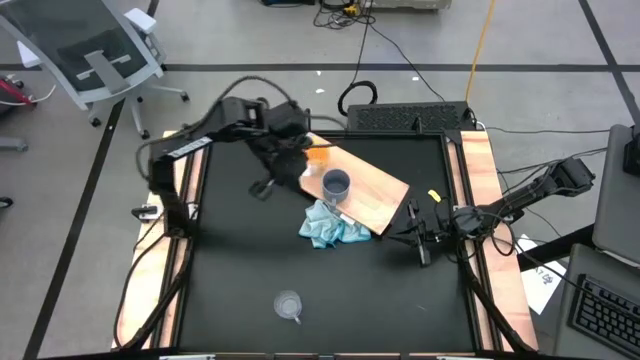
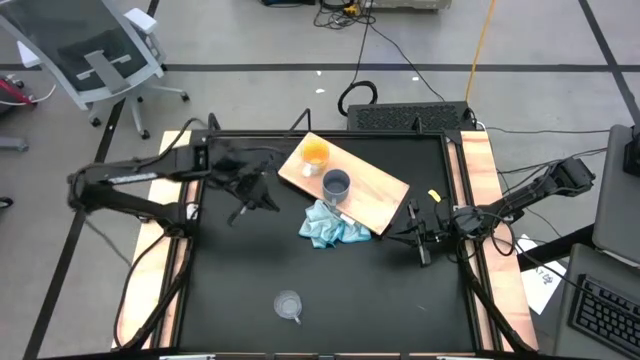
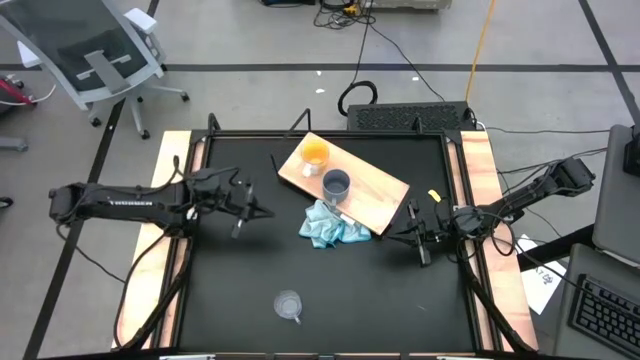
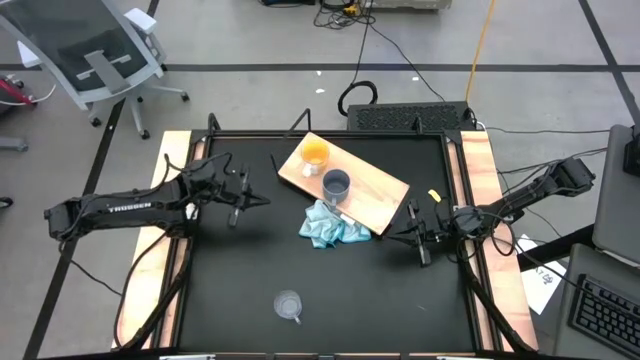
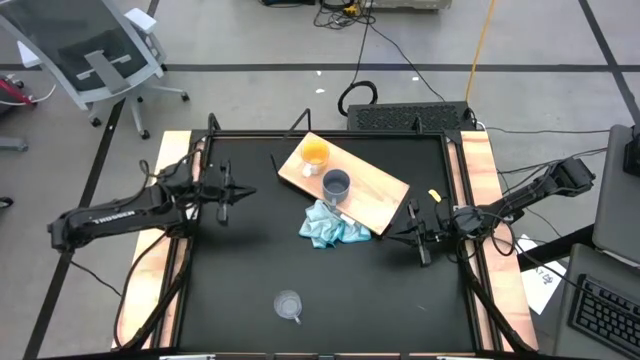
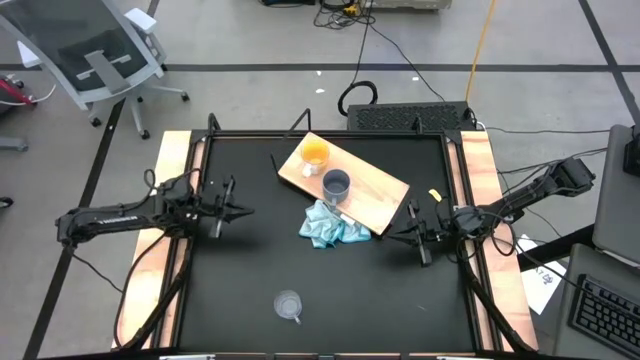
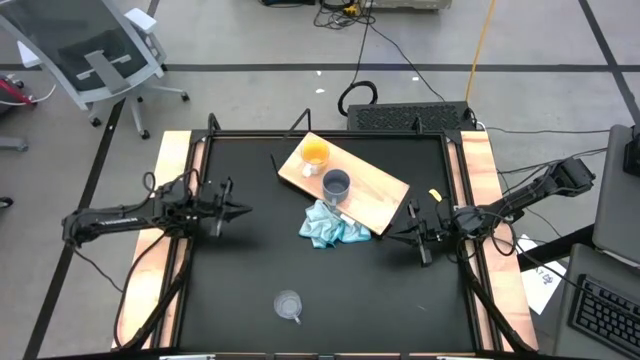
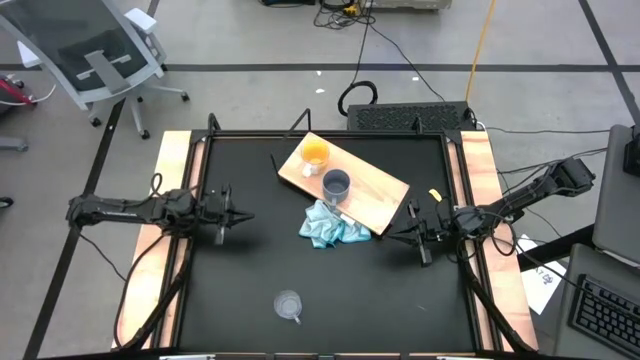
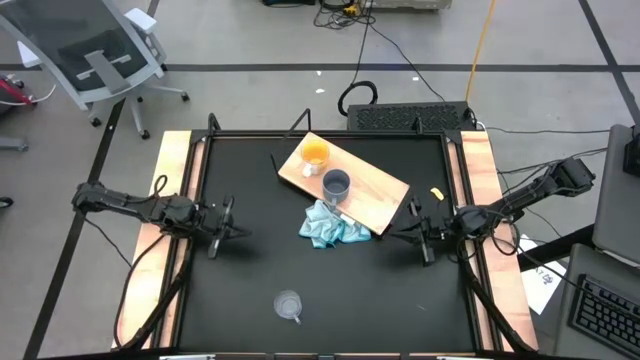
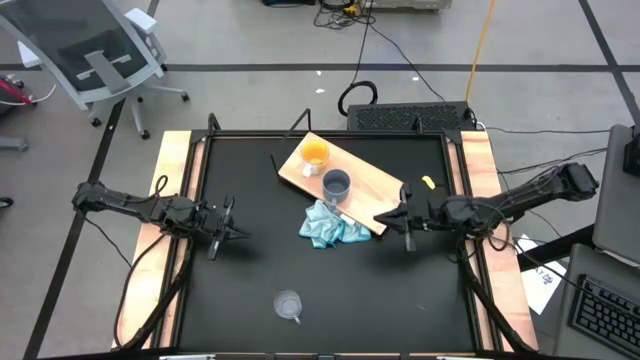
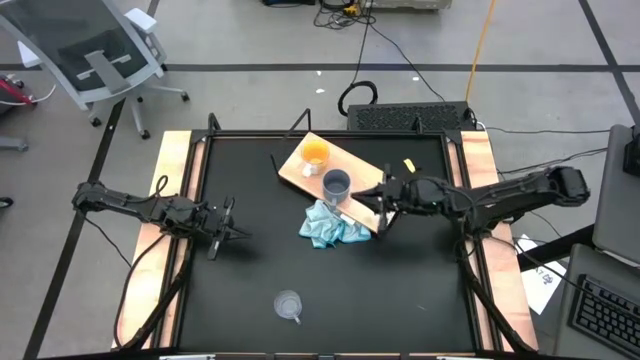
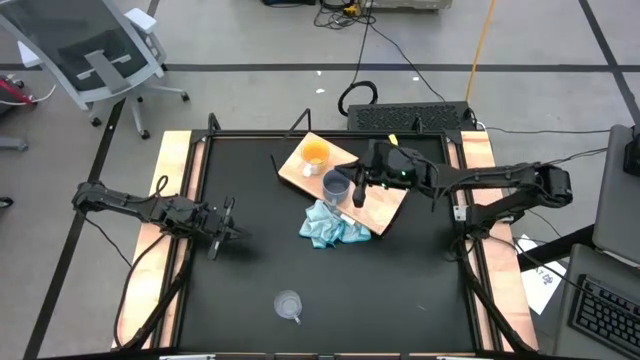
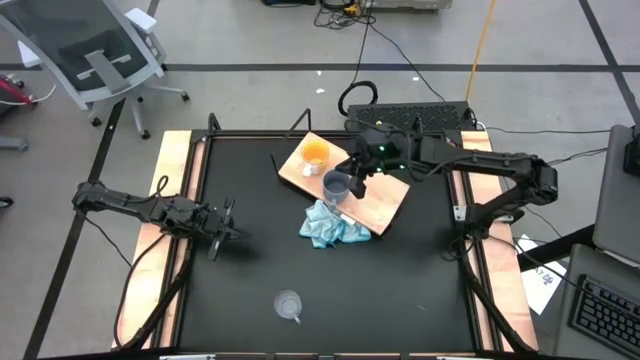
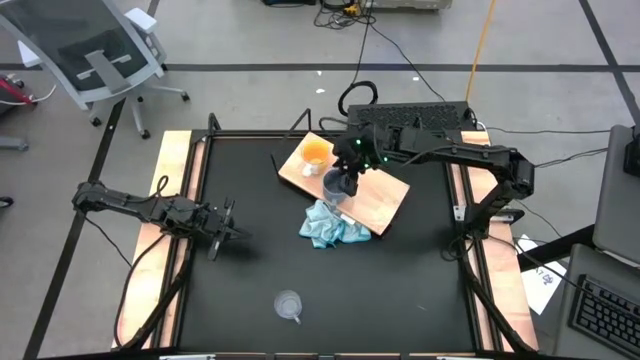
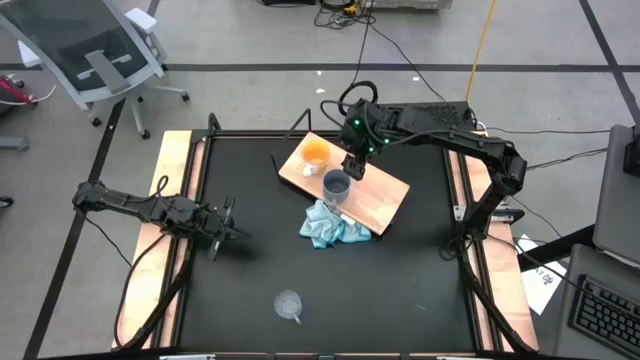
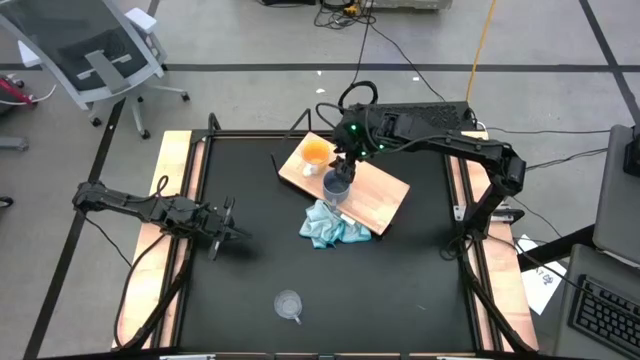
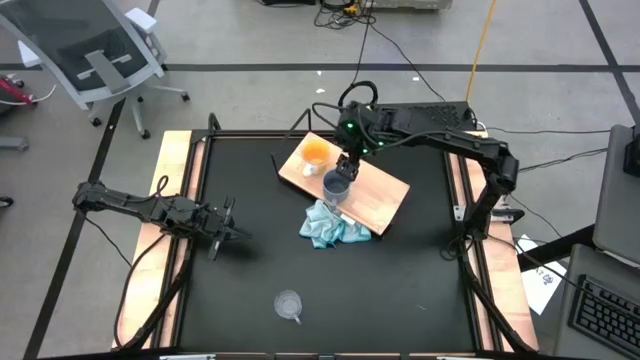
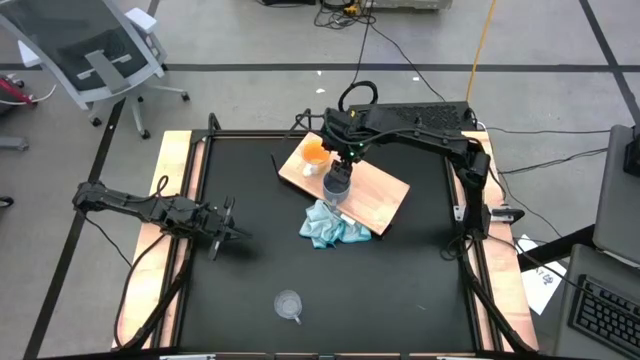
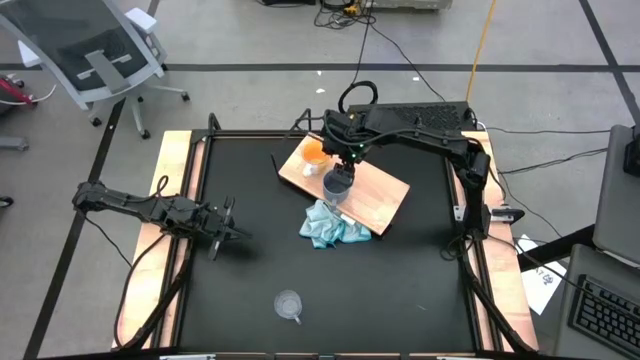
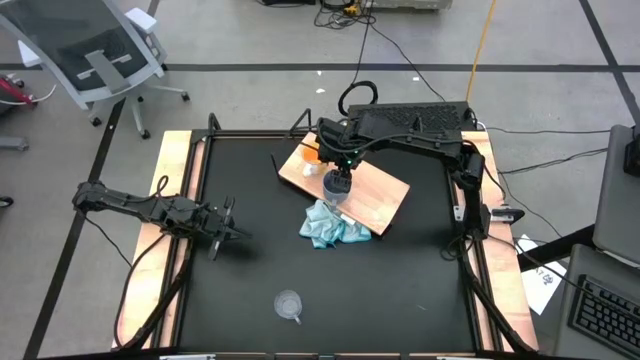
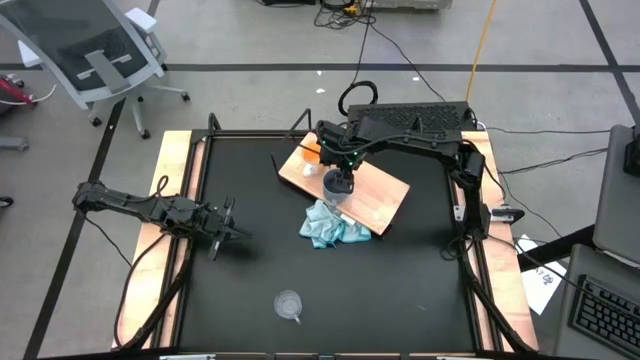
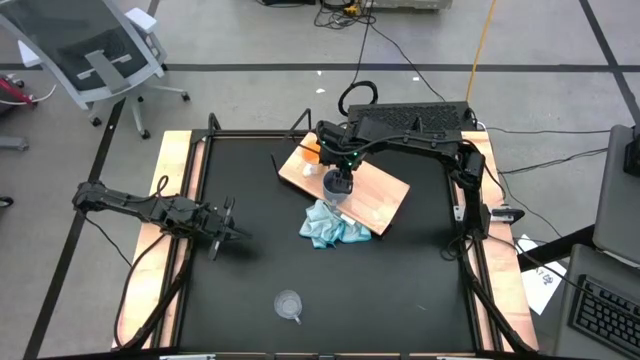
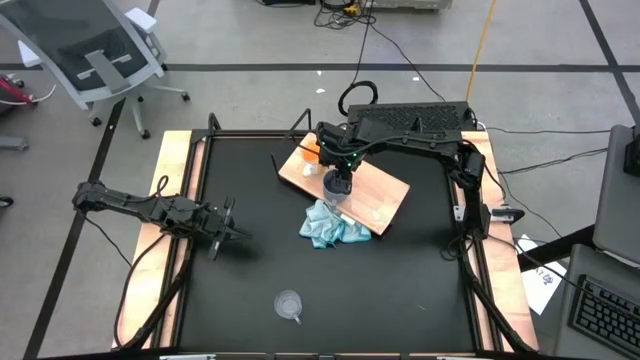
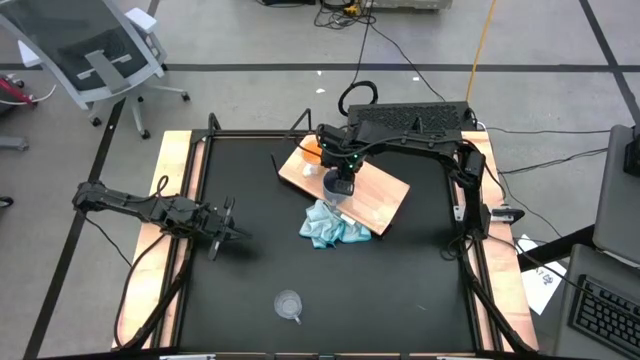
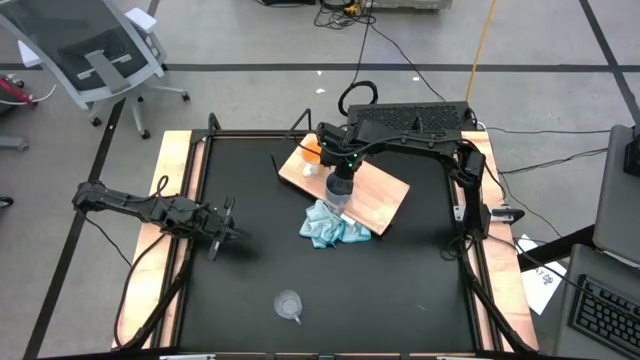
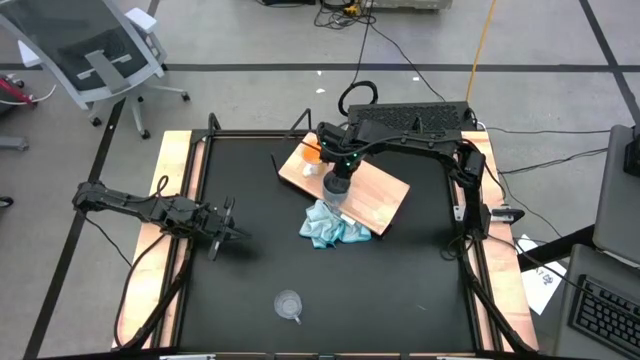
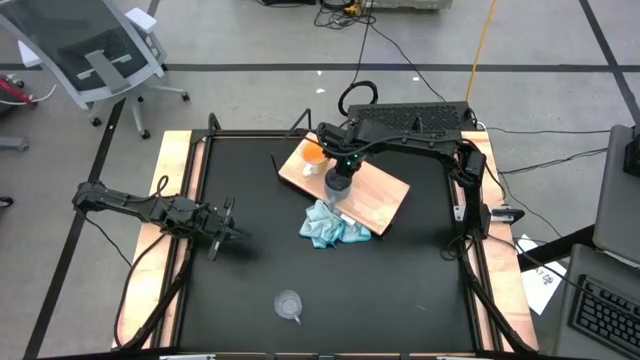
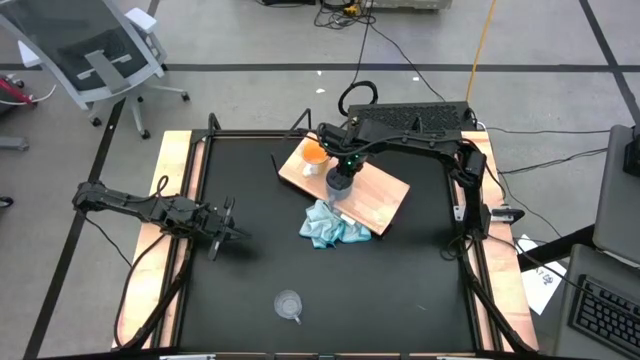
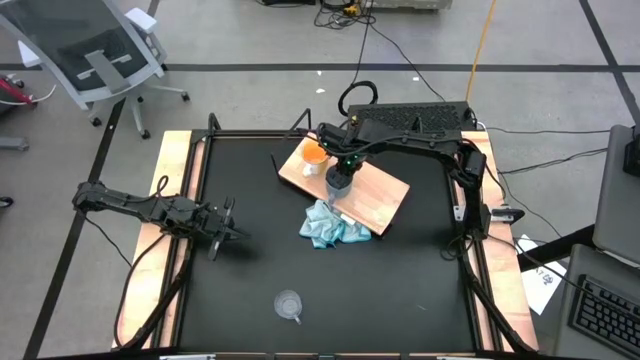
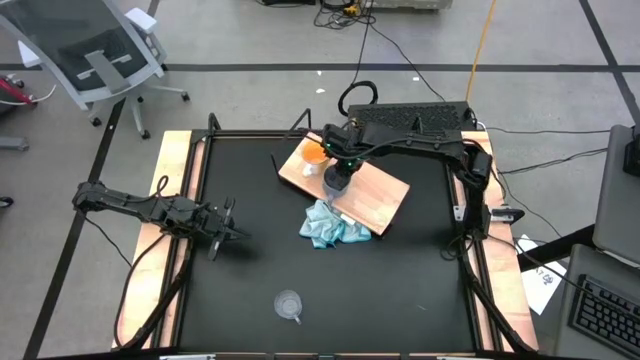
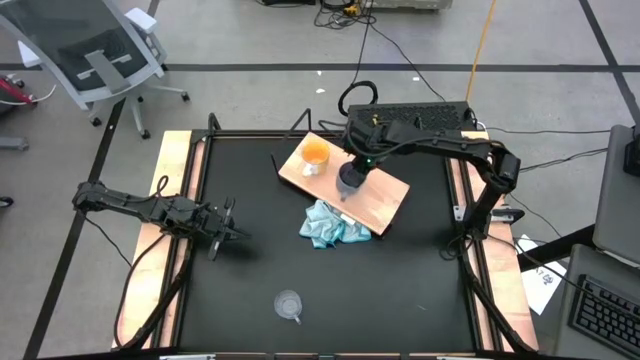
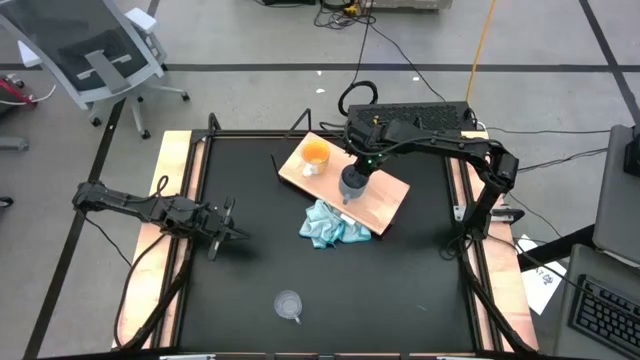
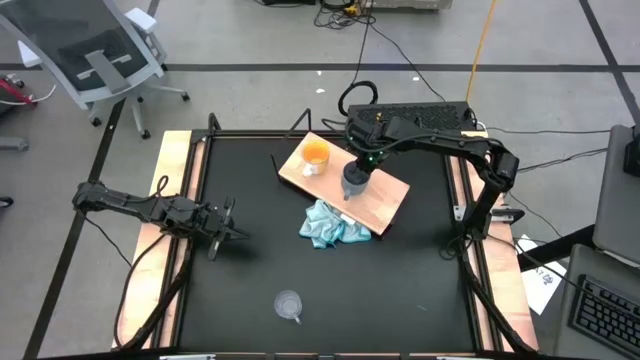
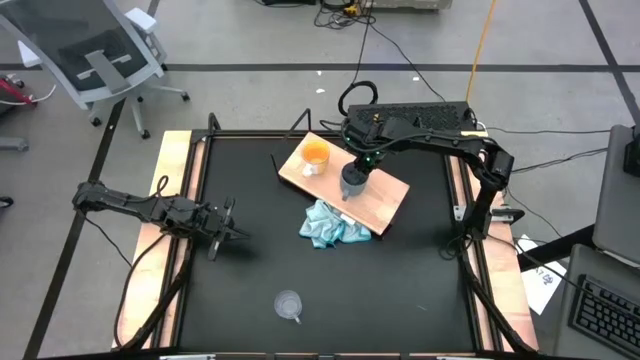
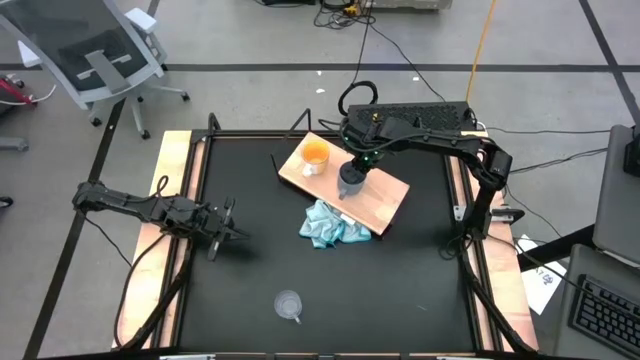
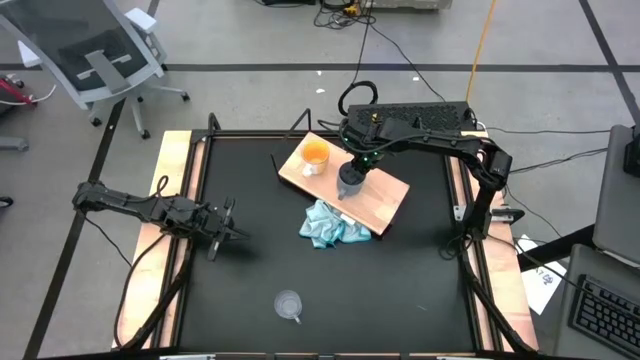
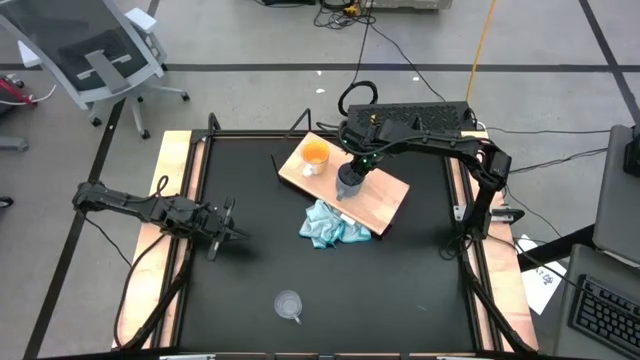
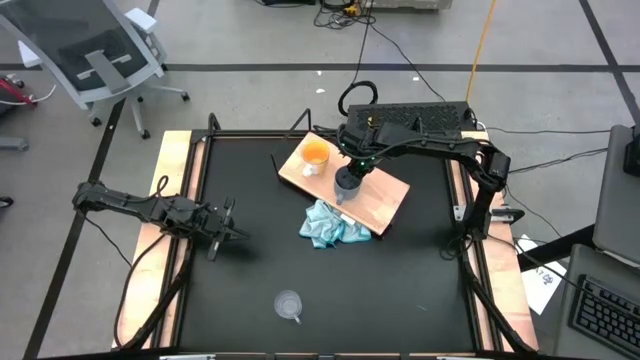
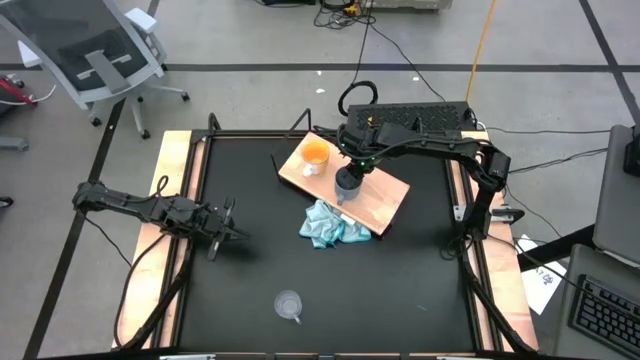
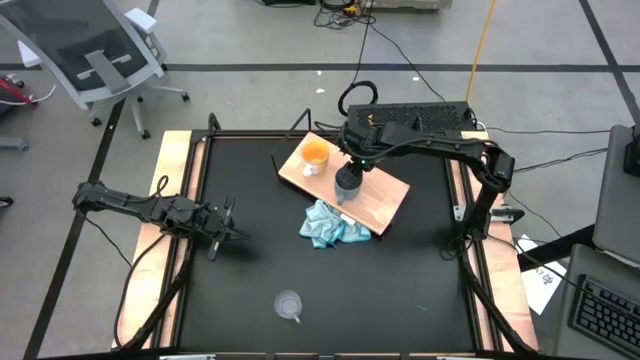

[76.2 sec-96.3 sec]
Task: Stack small to large cups/mugs on shelf
Adjust the position of the gray mug
